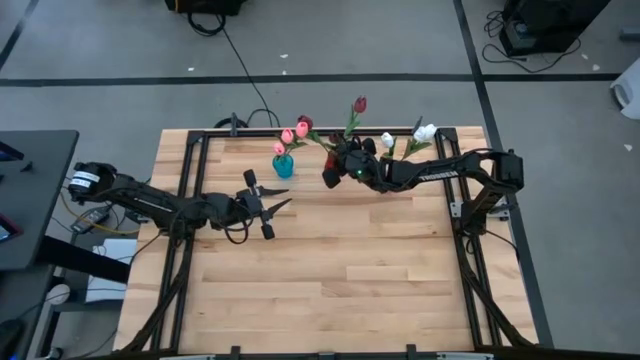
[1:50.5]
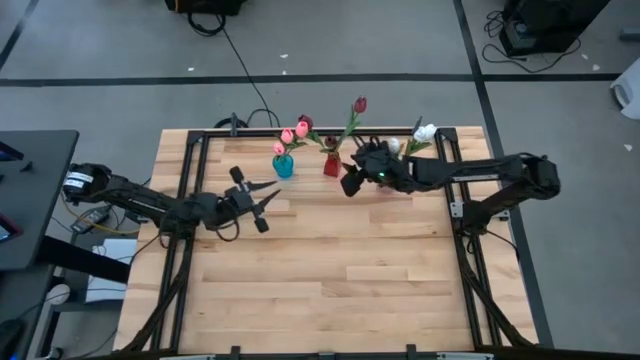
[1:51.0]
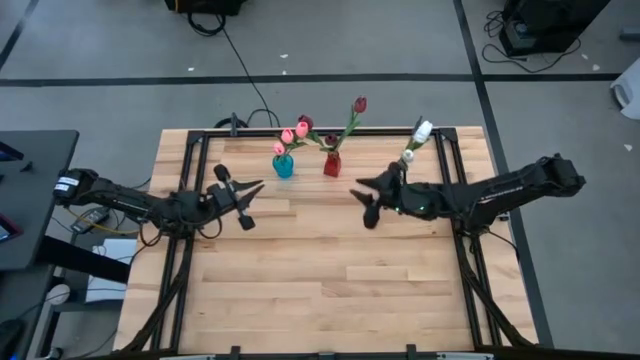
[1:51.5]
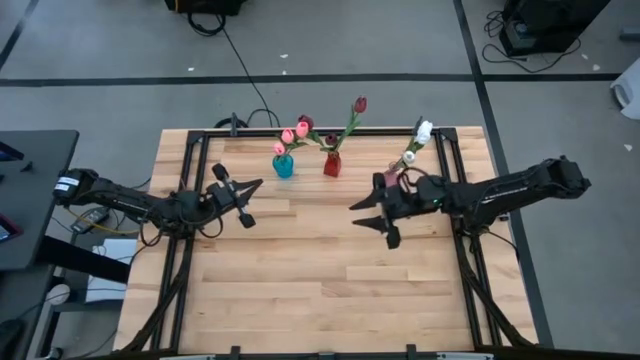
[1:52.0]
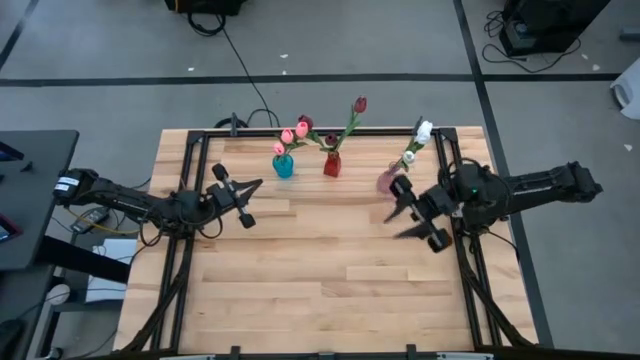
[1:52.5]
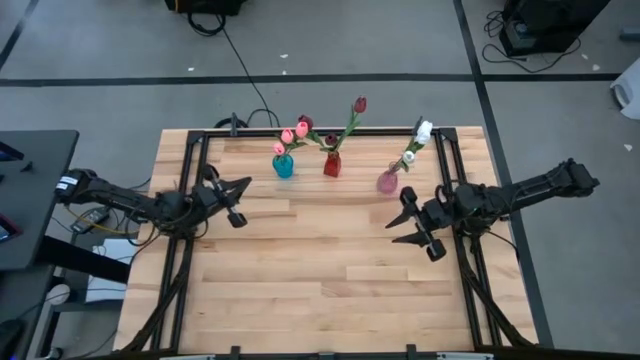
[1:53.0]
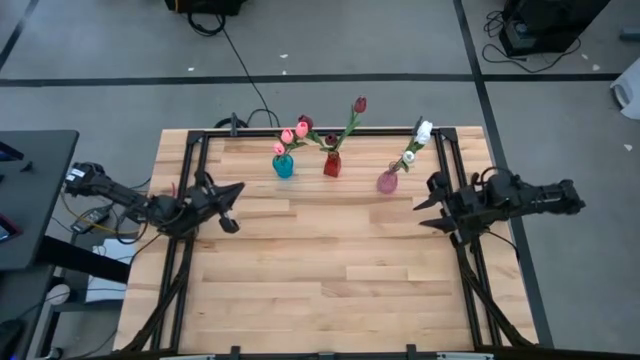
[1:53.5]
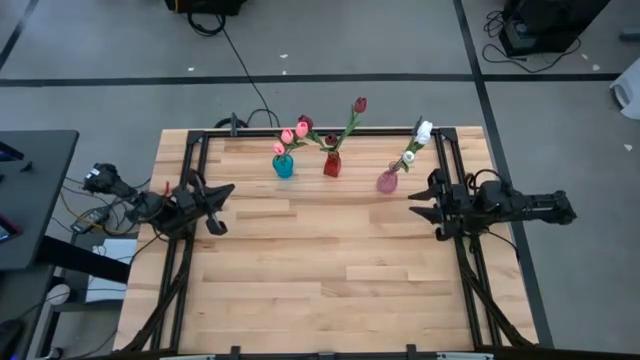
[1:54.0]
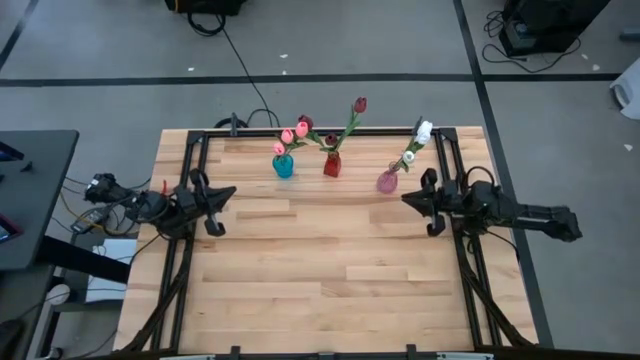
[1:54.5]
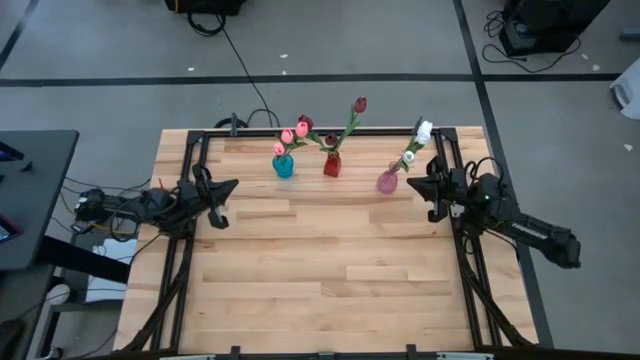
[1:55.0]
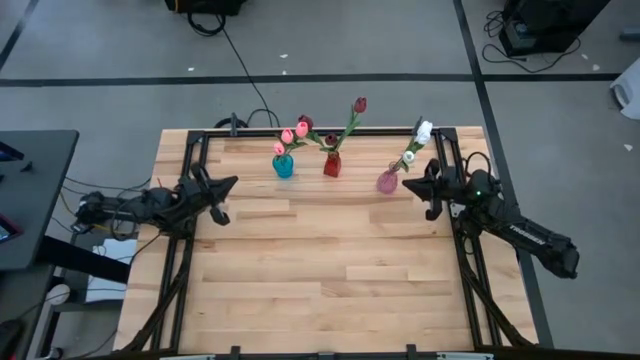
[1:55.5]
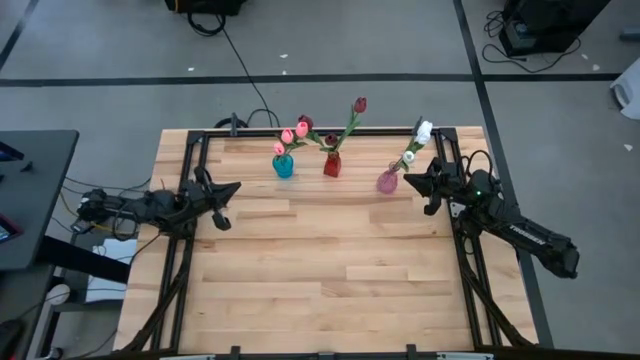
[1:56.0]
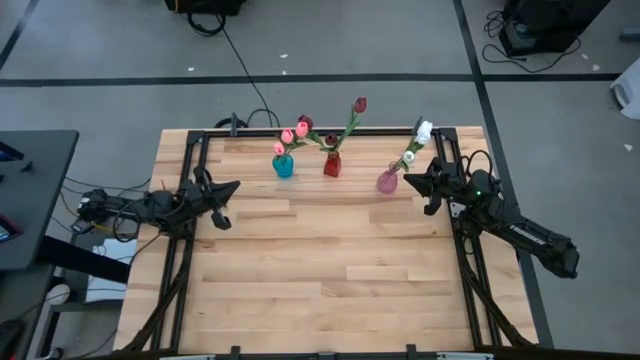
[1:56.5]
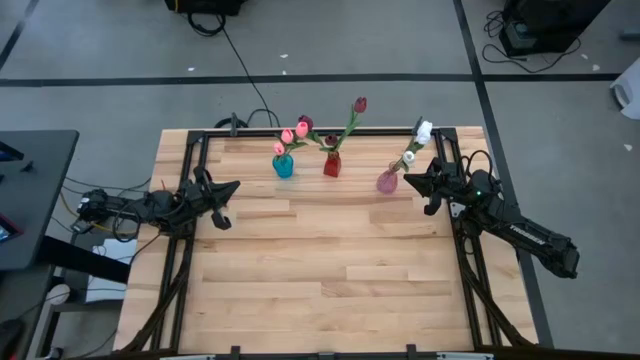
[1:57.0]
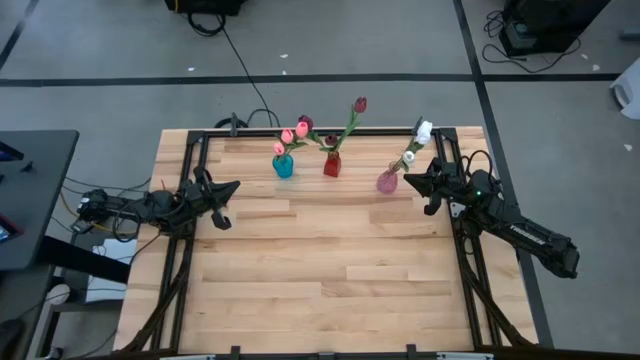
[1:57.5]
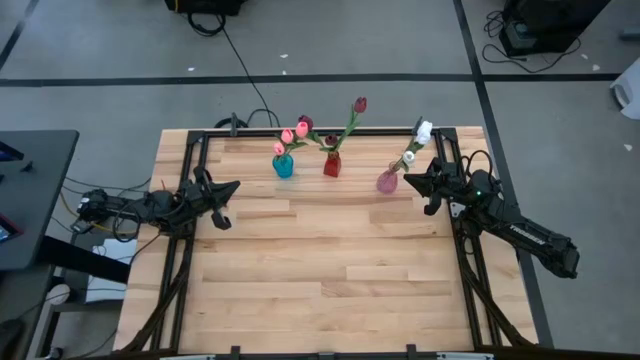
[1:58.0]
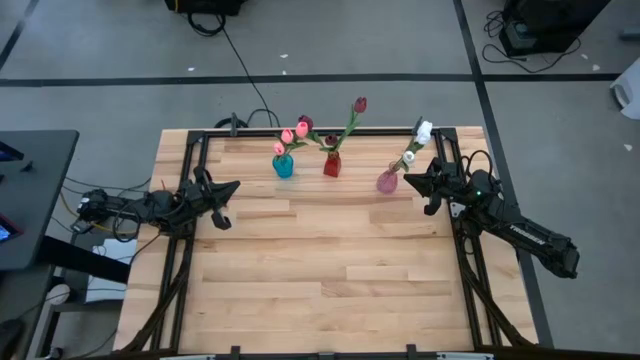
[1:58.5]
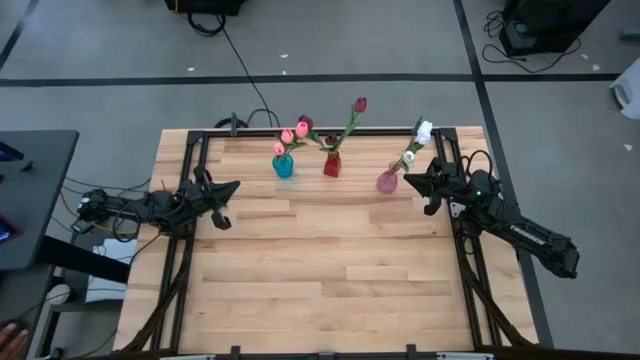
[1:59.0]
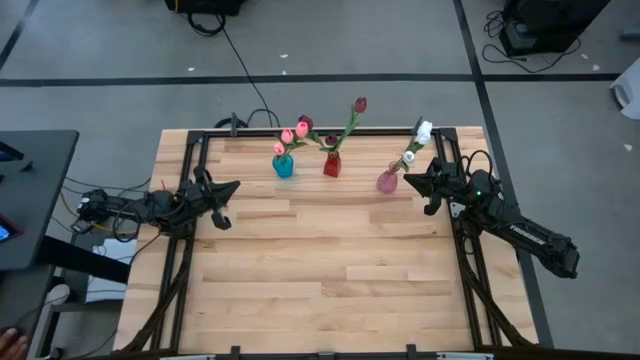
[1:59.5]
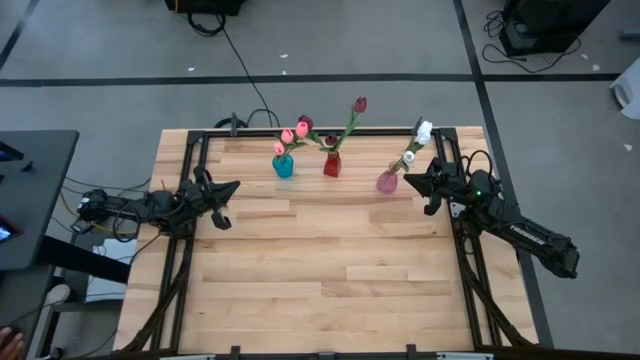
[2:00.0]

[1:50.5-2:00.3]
Task: Sort flowers into vase by color
Return to Home Position

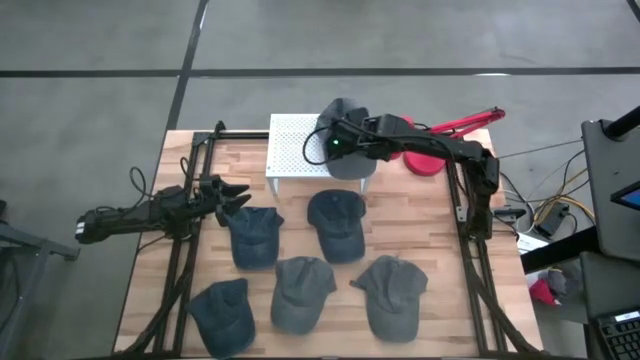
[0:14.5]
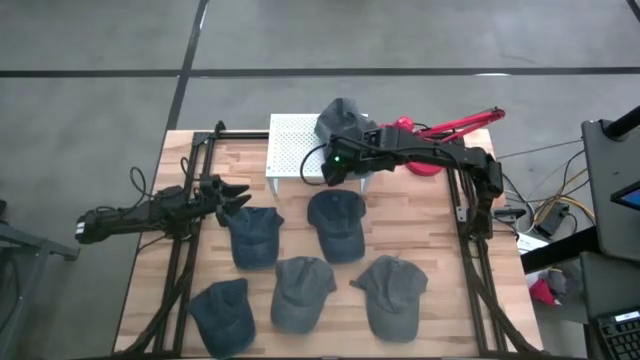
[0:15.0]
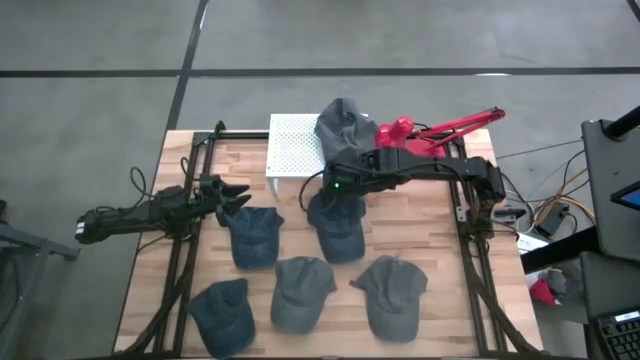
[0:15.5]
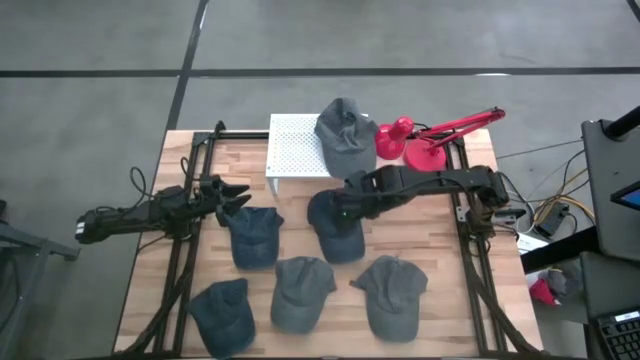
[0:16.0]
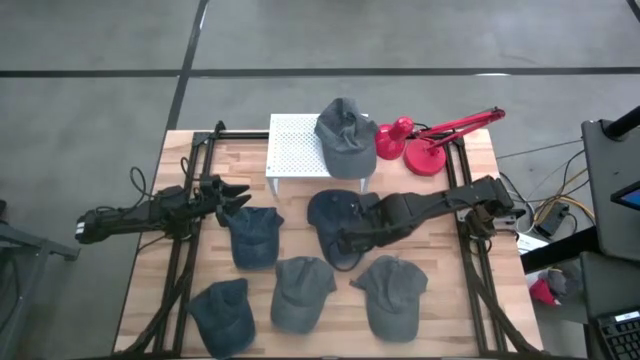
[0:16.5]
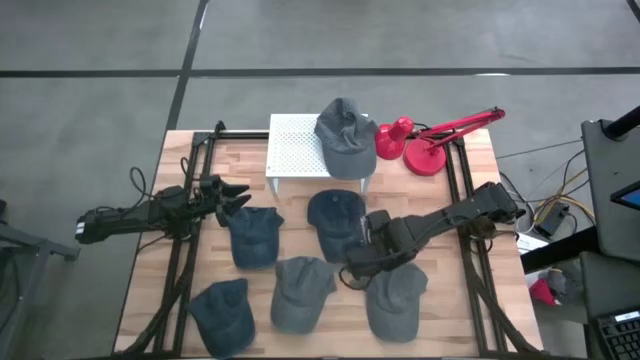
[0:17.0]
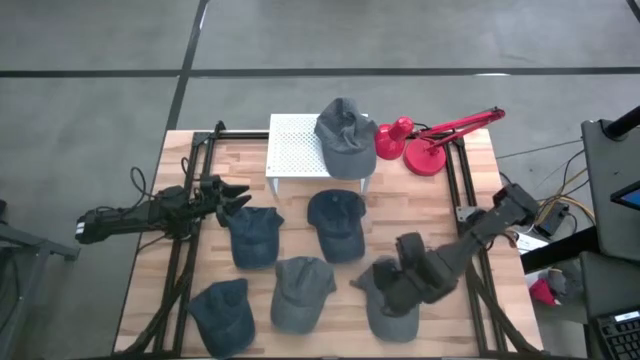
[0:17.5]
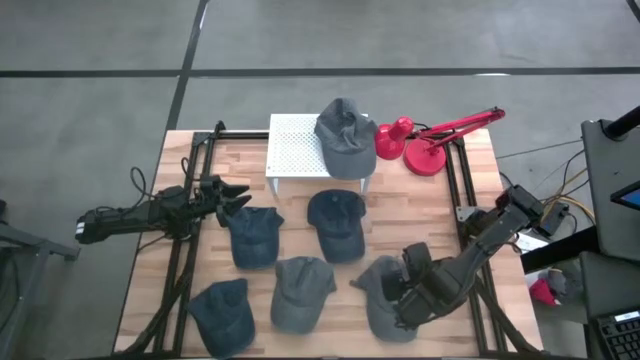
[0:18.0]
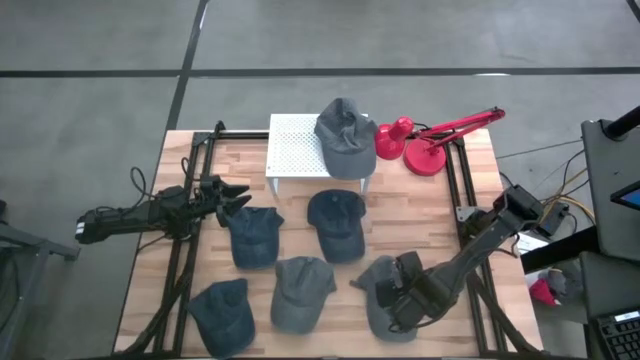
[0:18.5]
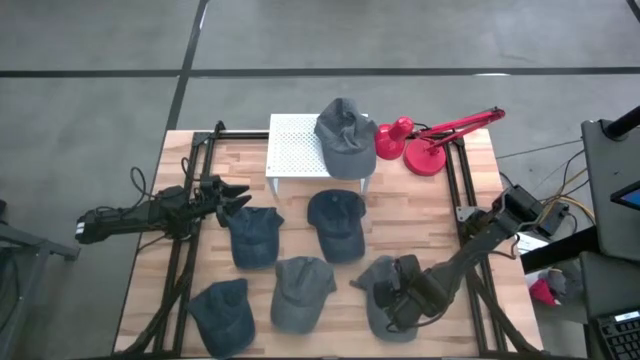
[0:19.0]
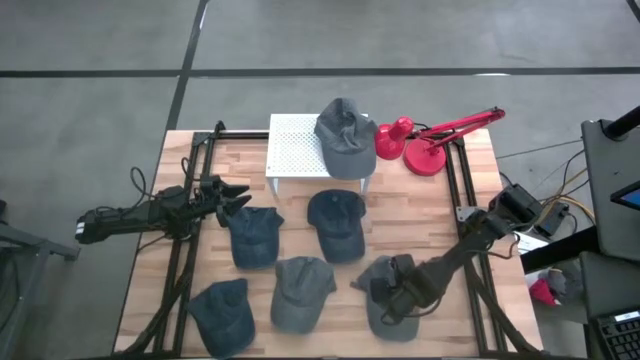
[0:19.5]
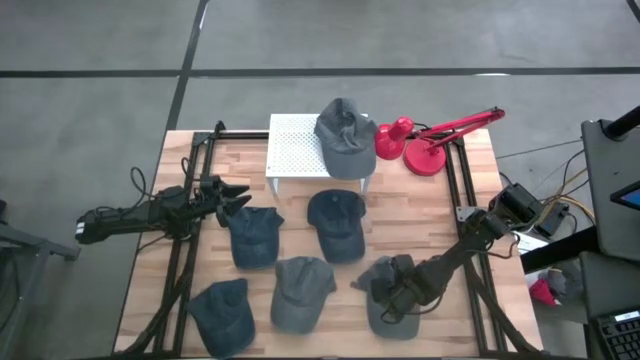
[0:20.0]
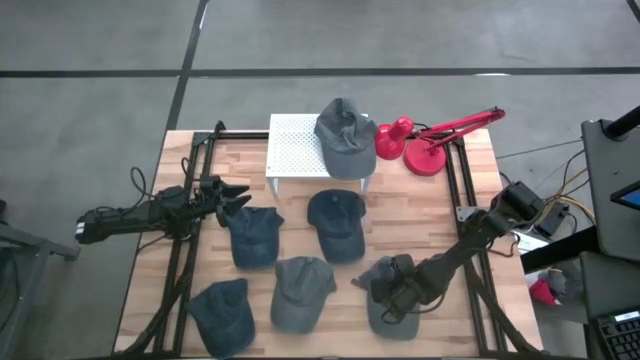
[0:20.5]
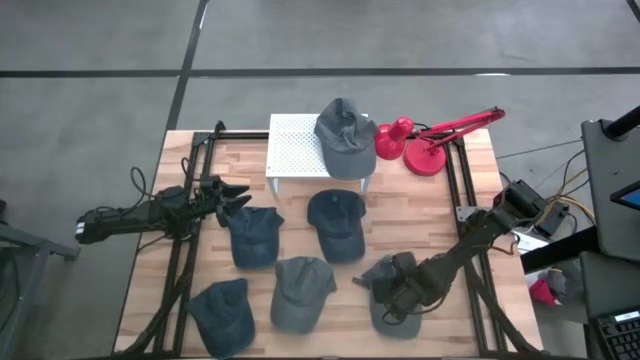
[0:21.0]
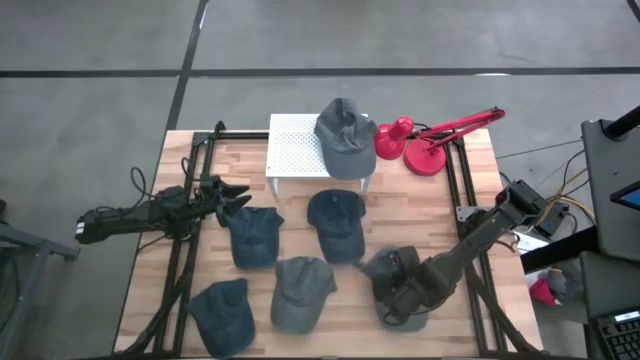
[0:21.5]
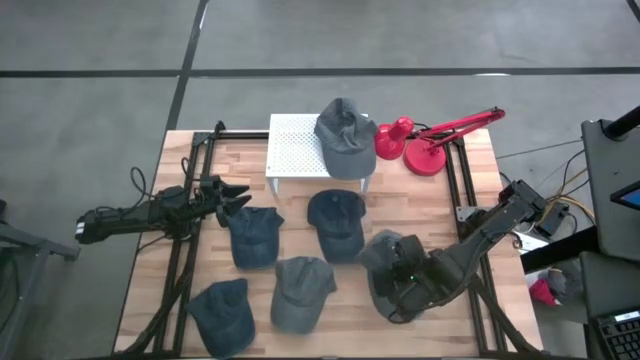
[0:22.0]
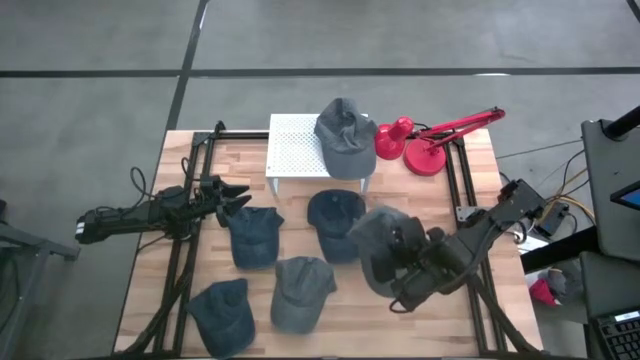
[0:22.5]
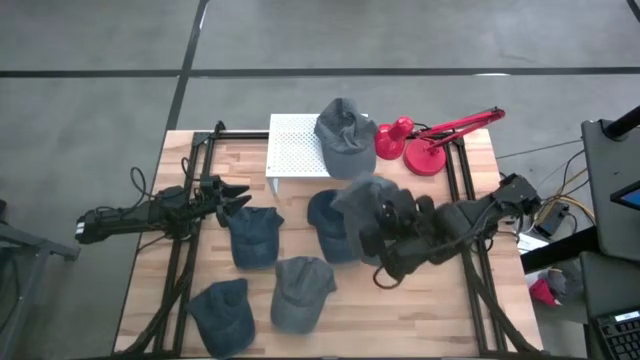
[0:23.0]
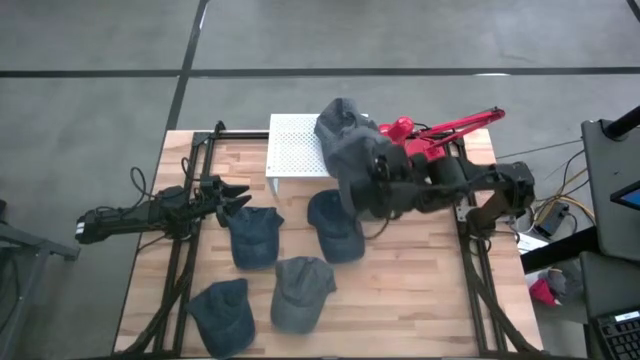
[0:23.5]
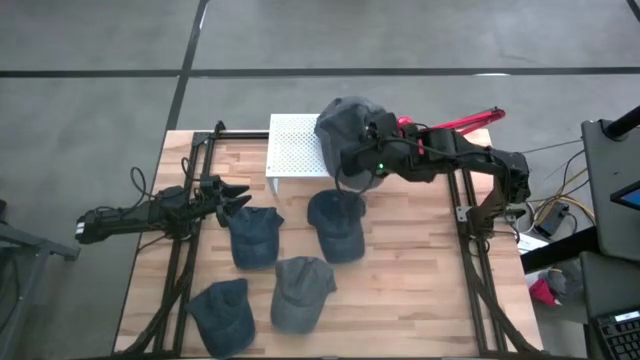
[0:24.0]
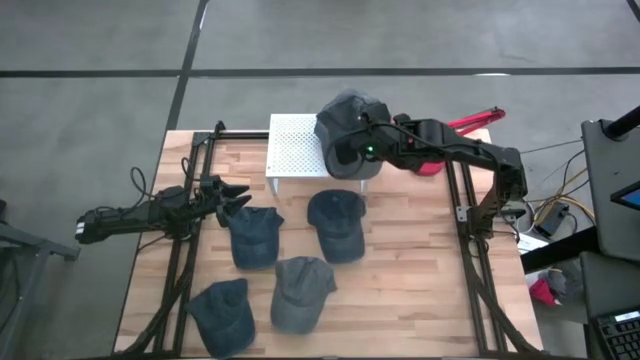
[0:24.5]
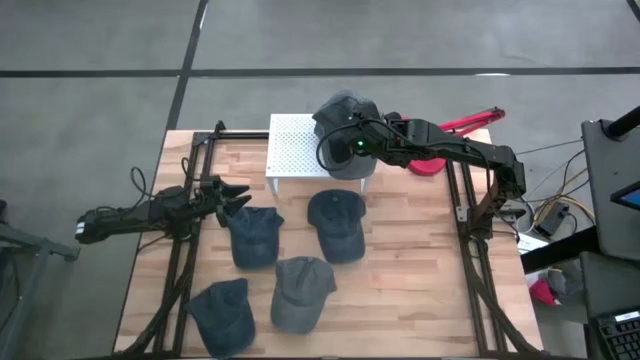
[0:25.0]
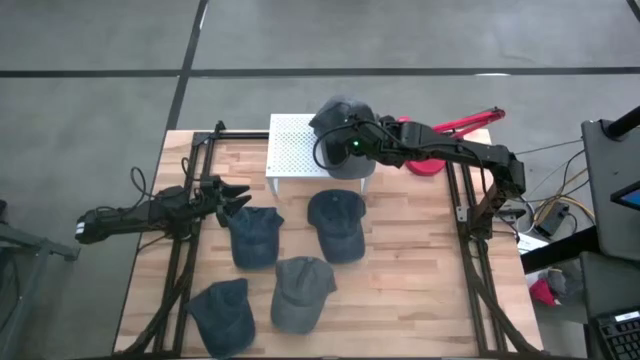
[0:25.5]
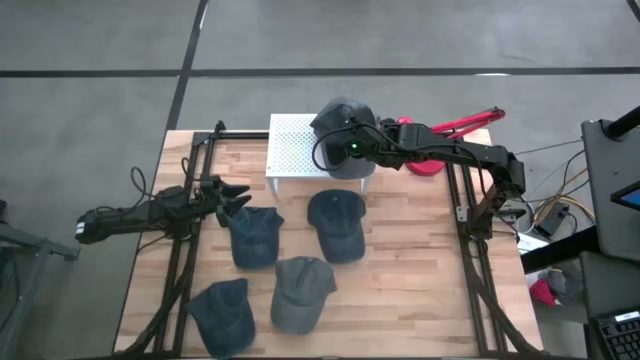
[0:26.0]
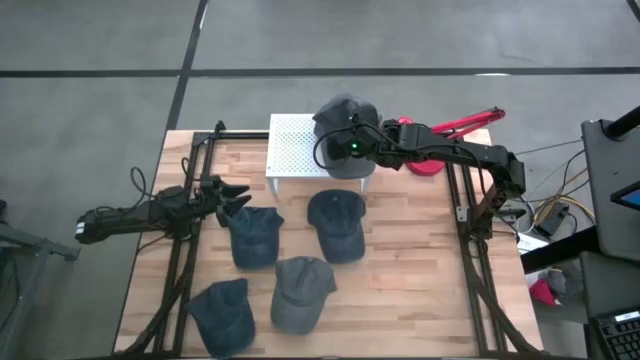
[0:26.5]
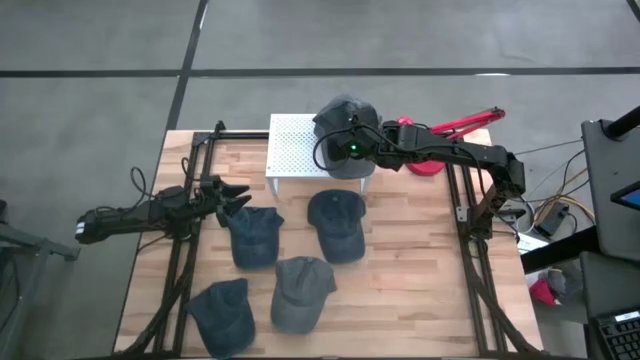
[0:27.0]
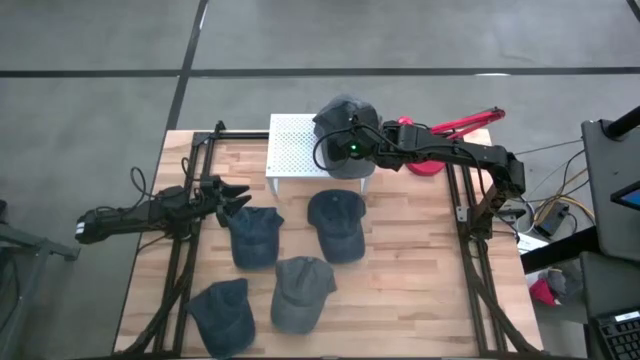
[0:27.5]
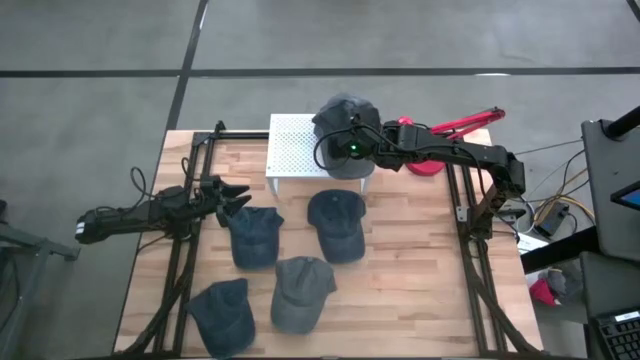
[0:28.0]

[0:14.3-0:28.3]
Task: Pick & Place hat
Put the right gray cap on the shelf
